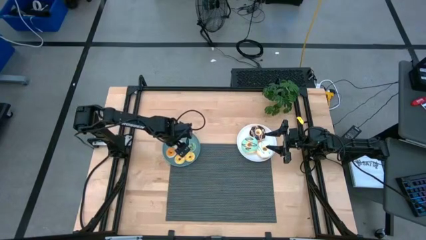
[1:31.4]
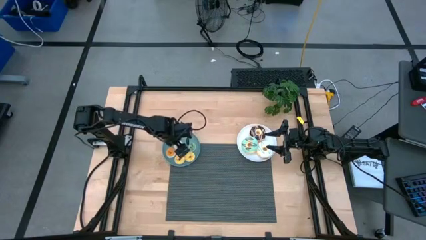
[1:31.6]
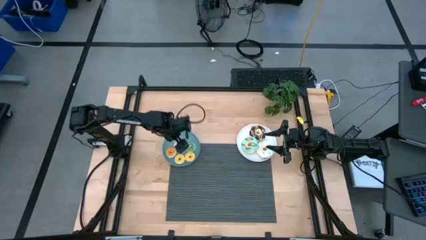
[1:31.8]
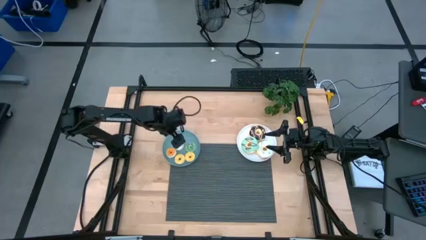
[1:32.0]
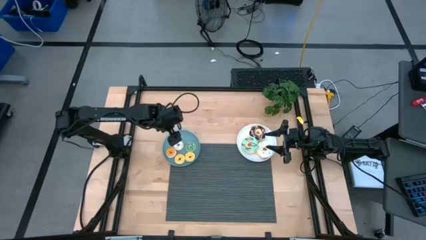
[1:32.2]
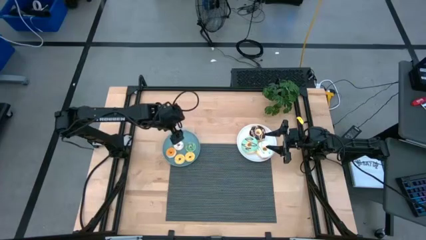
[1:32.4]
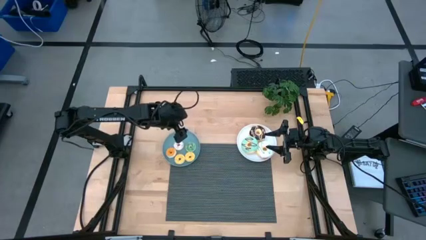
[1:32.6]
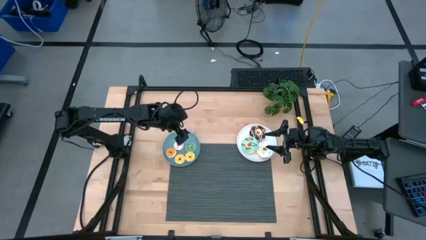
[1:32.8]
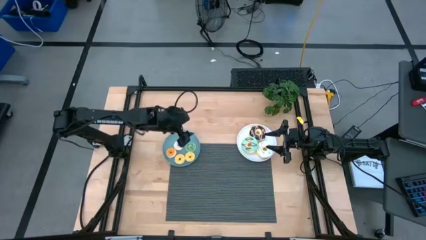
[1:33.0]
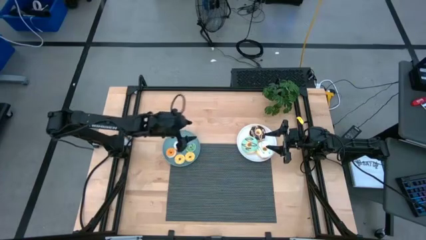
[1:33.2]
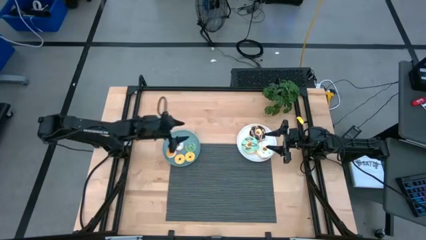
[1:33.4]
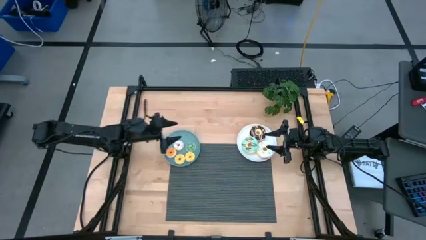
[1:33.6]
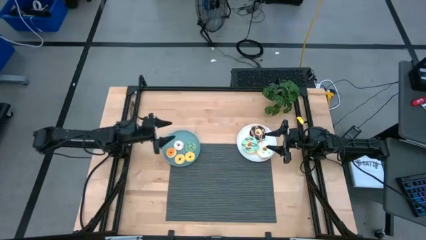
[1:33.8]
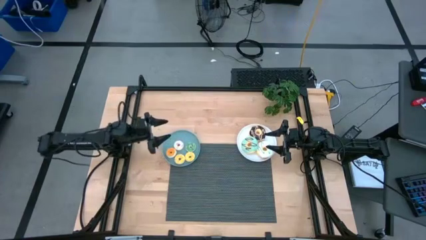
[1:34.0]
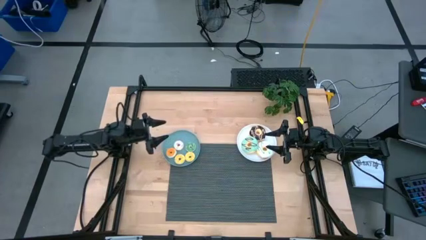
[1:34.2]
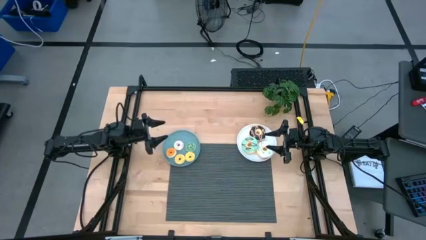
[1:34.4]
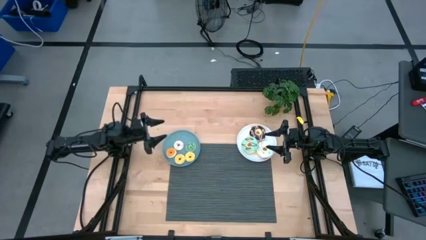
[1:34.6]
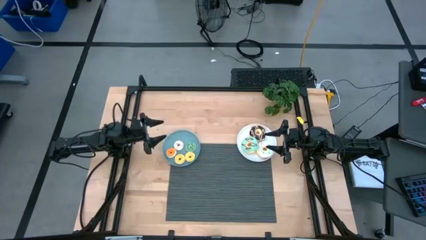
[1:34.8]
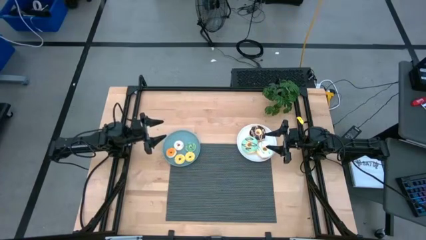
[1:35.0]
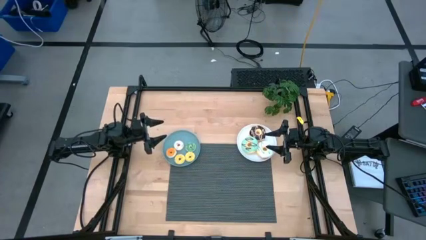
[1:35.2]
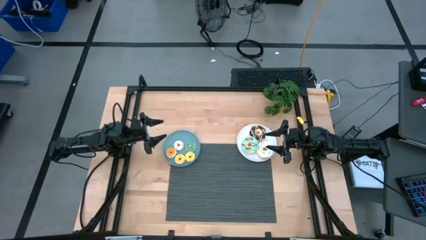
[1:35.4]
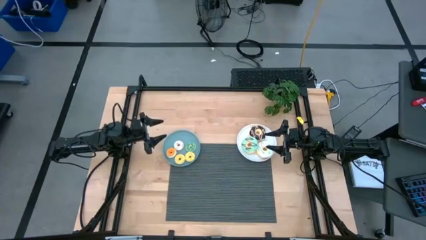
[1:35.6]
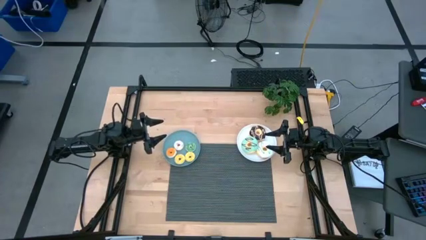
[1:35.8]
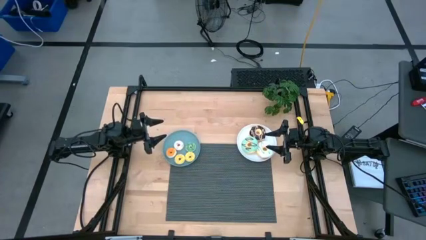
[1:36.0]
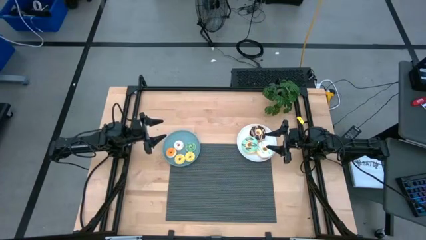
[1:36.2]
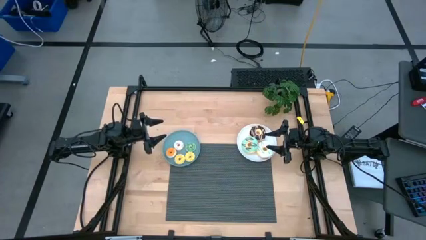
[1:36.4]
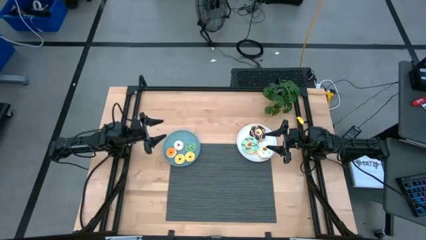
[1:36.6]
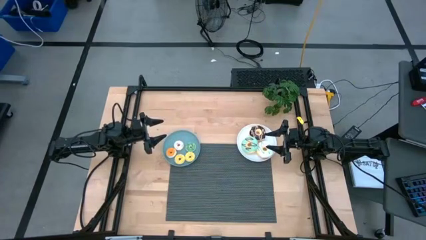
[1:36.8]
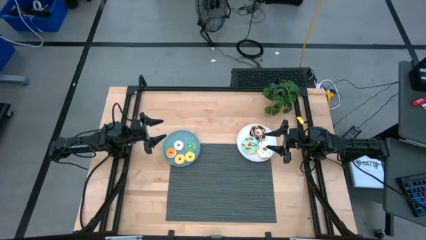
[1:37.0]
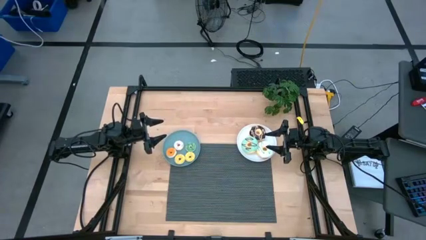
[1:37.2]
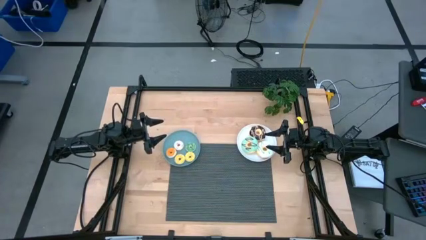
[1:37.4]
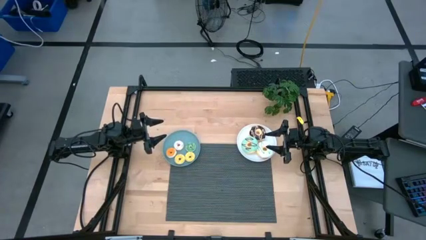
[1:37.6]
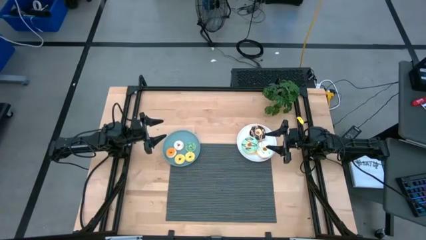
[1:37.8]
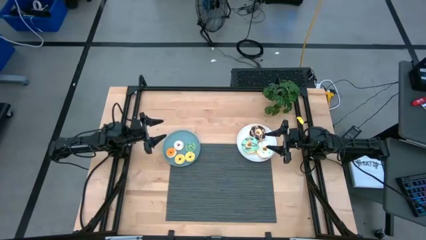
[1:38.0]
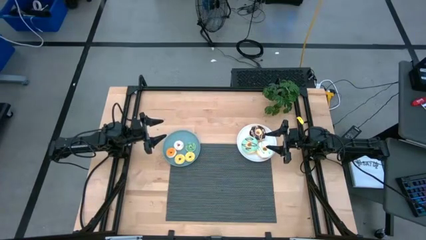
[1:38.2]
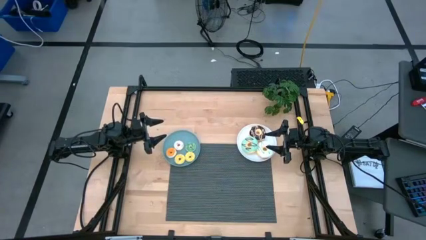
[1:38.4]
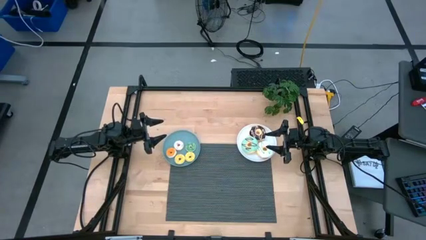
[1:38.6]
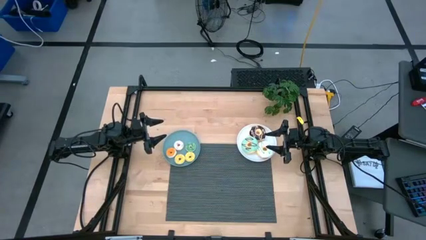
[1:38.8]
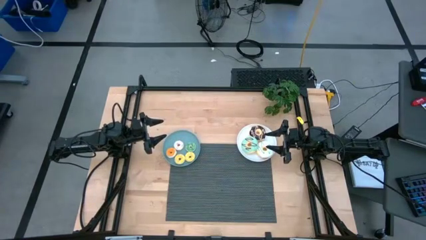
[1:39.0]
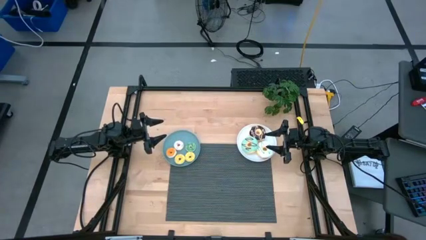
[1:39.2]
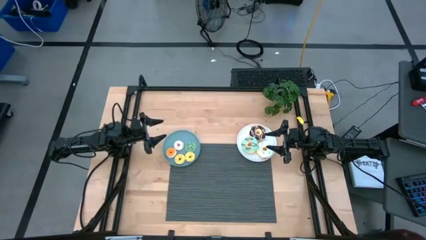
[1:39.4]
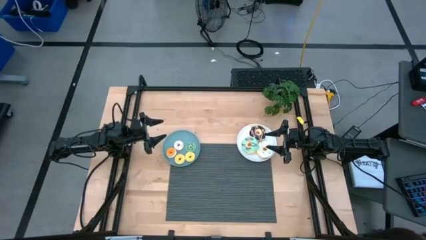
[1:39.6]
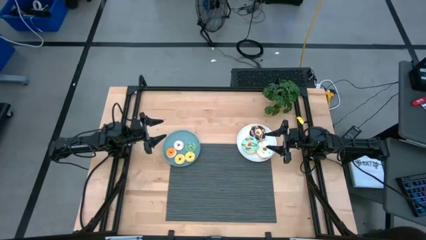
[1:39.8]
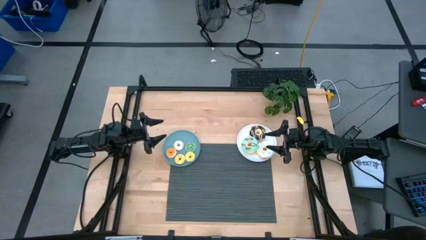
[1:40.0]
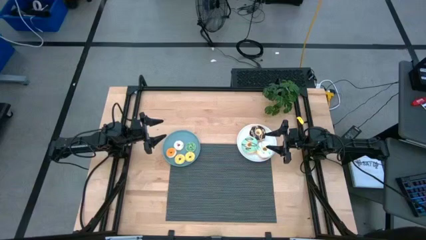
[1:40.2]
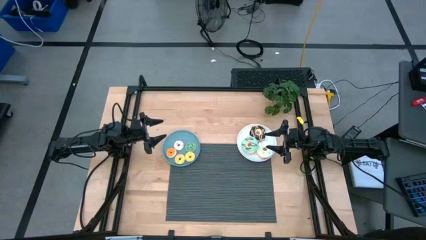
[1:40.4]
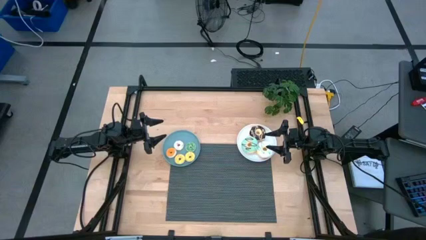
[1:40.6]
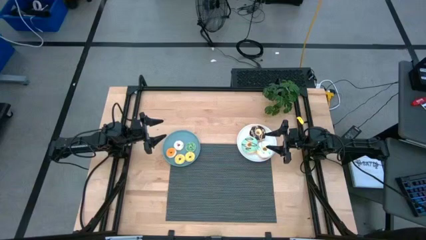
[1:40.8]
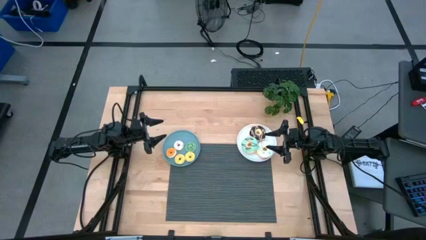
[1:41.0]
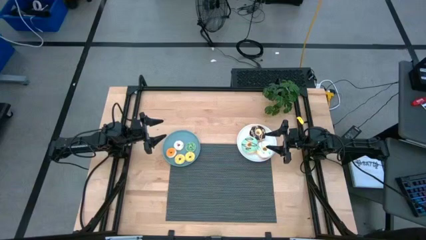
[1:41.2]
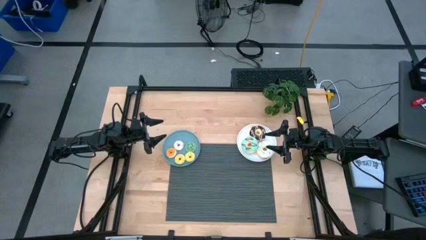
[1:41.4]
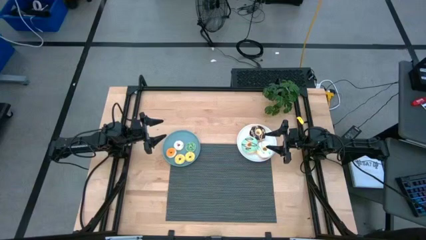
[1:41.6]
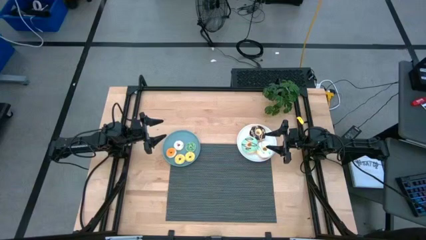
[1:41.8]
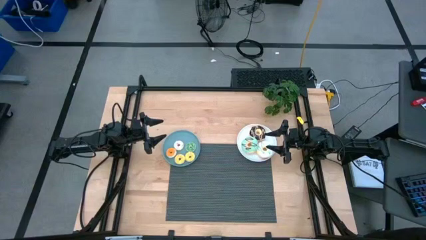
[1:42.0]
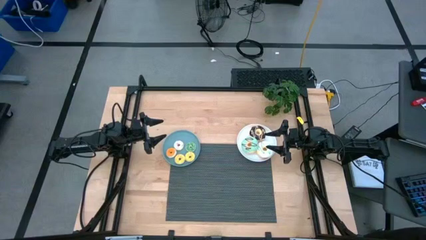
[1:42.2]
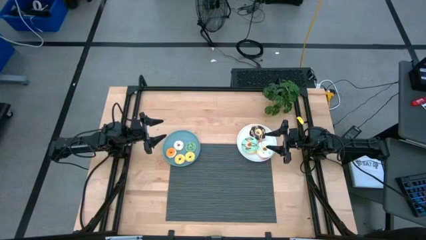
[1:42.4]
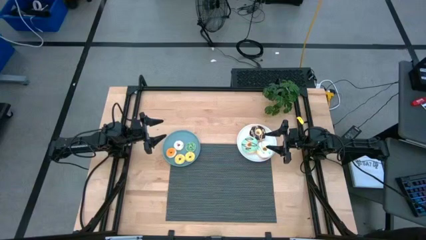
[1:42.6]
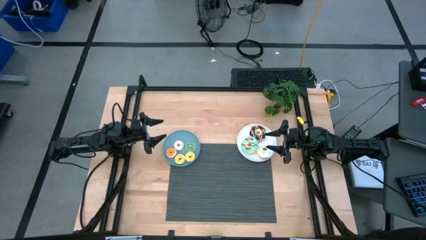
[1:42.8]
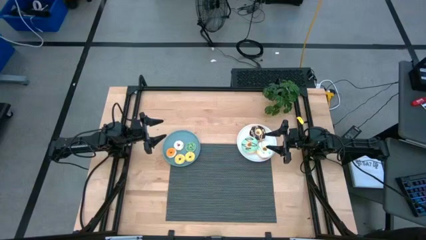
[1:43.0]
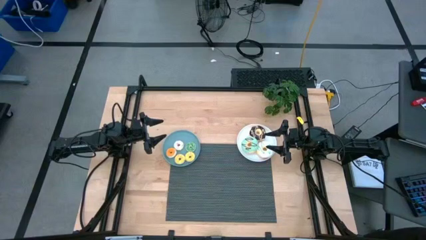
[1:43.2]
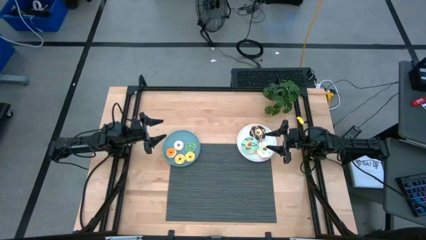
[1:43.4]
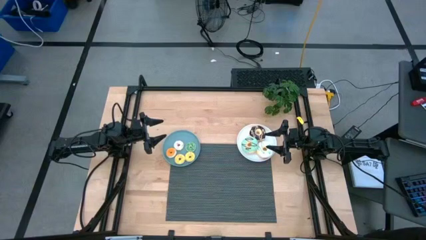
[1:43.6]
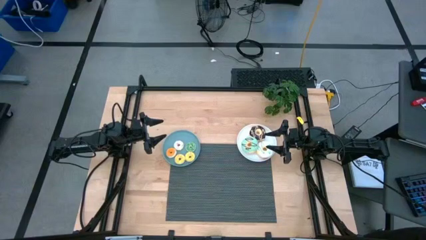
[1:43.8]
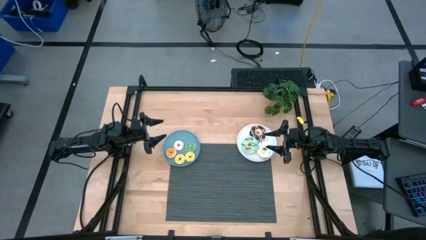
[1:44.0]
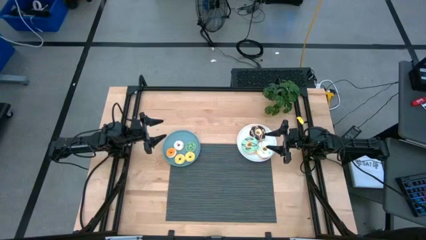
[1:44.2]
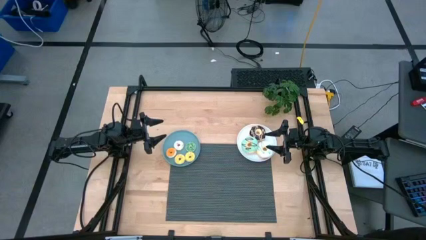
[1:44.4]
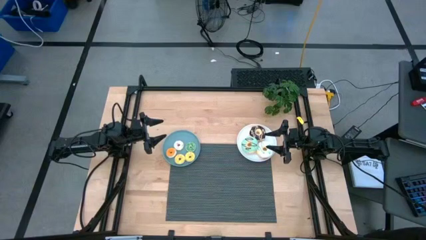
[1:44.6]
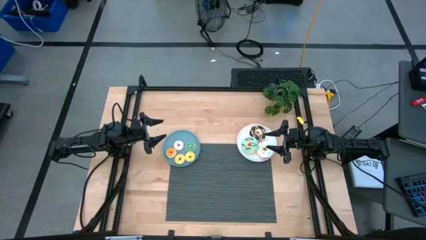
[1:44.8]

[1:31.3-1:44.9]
Task: Pick & Place donuts
Return to Home Position
